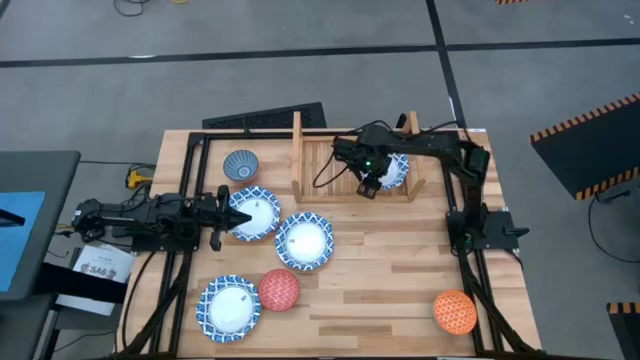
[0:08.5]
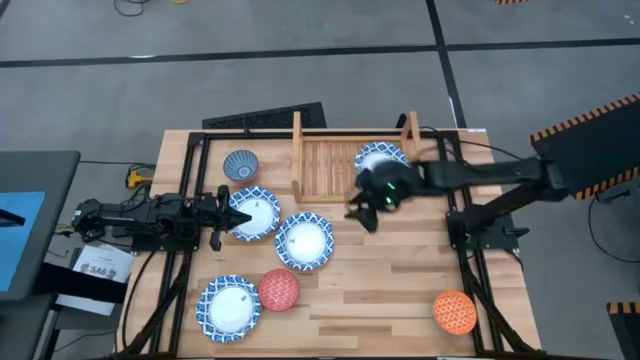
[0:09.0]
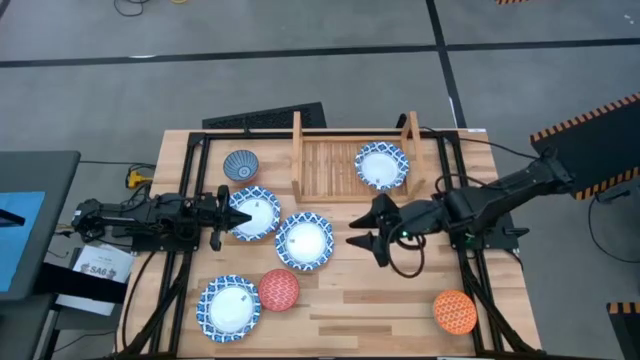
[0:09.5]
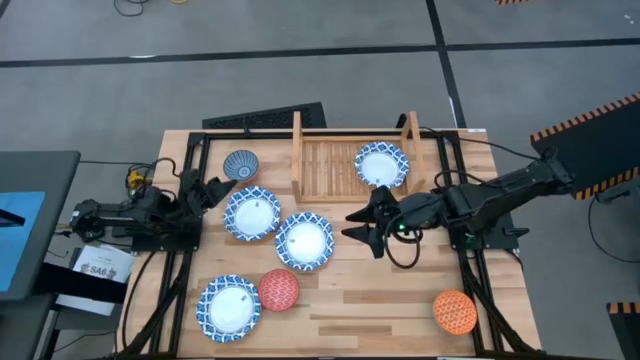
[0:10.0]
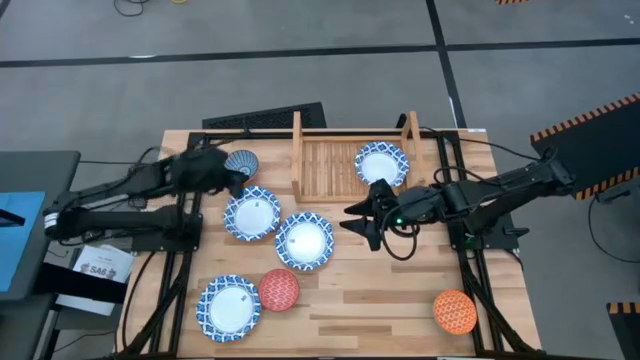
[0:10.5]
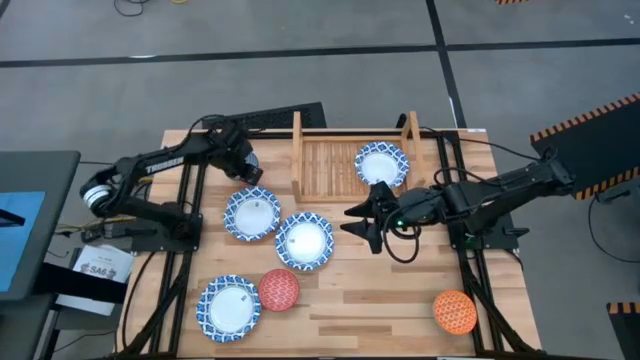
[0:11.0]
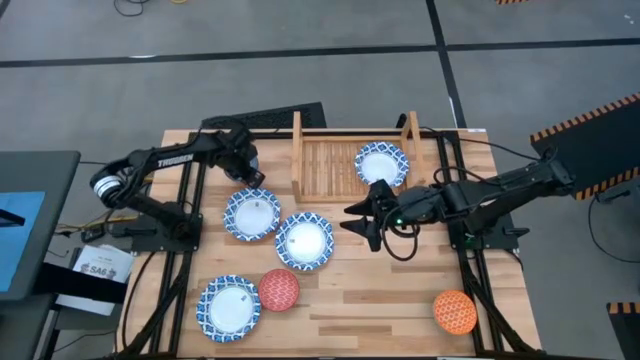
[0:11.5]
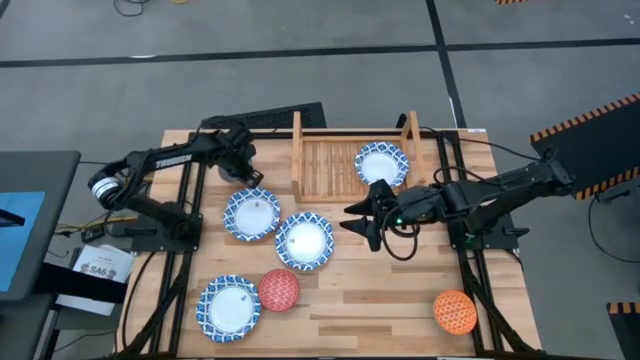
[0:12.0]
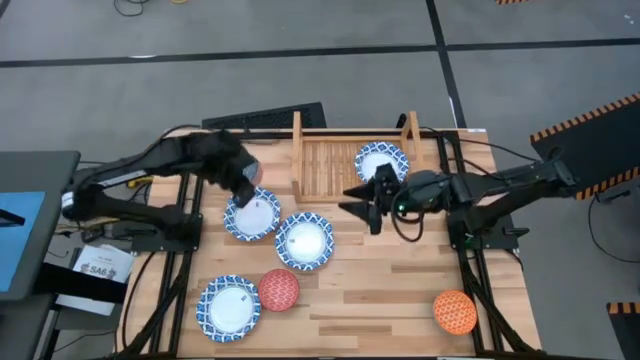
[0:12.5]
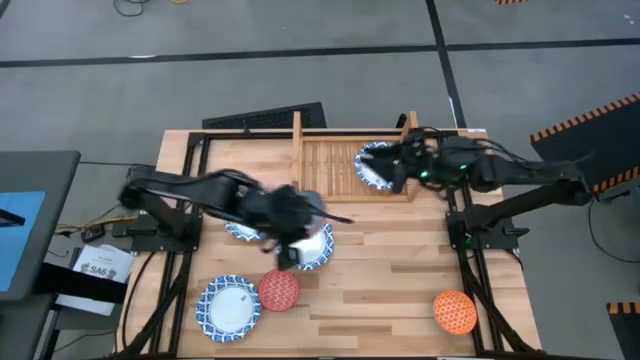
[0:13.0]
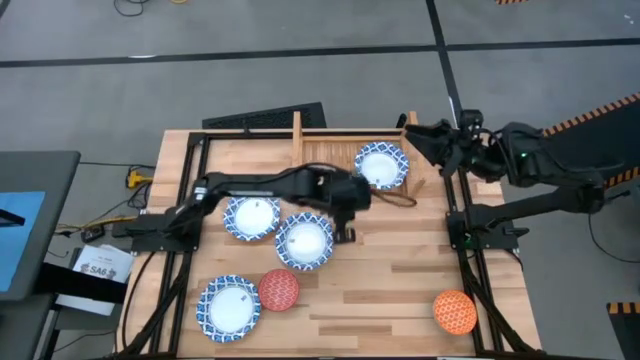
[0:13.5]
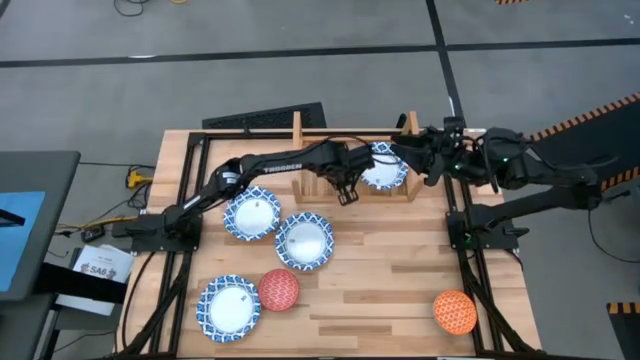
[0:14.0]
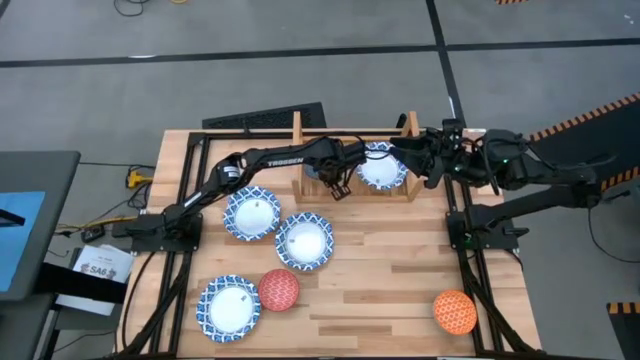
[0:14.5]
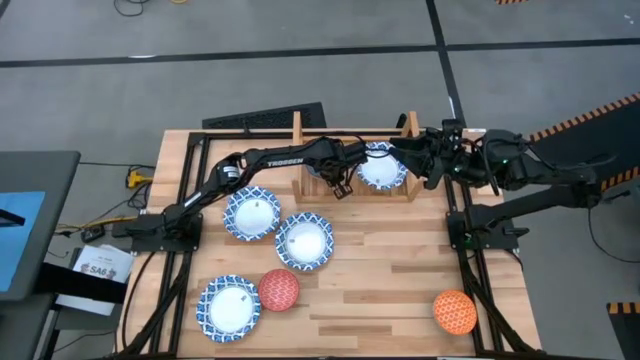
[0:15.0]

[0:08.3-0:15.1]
Task: Place and stack bowls onto a shelf
Put the dark blue small bowl on the shelf

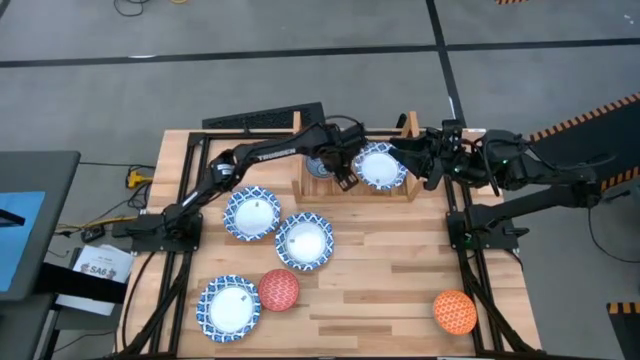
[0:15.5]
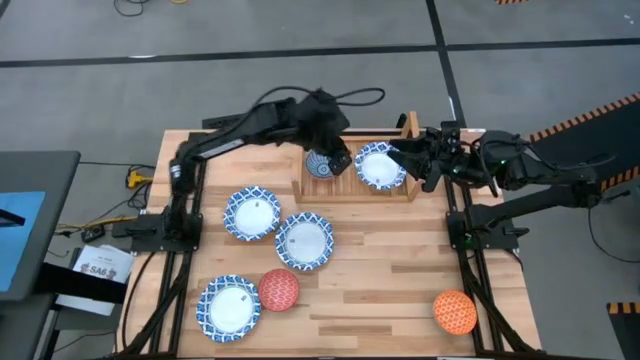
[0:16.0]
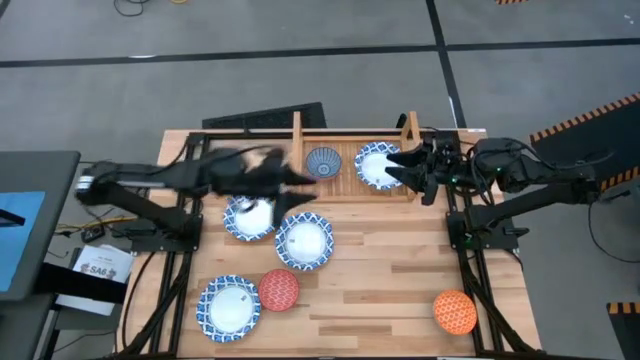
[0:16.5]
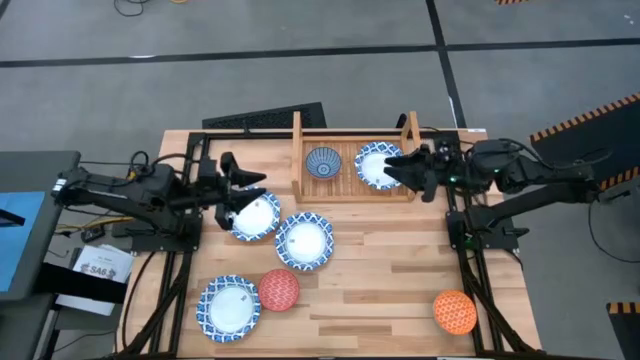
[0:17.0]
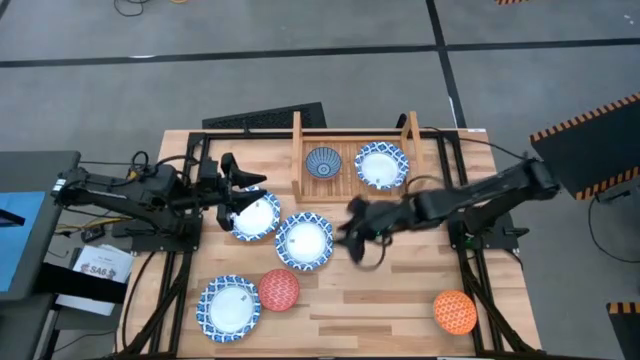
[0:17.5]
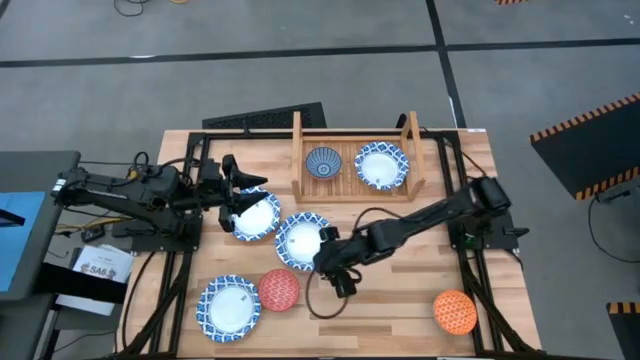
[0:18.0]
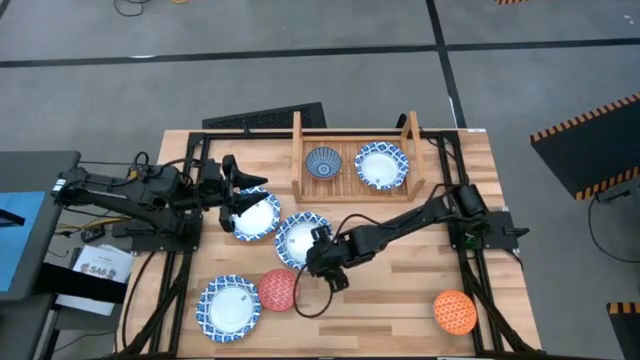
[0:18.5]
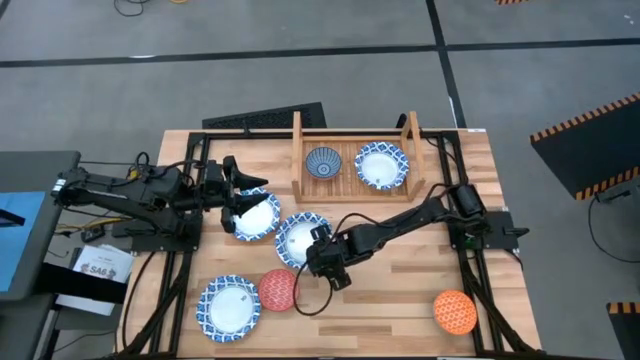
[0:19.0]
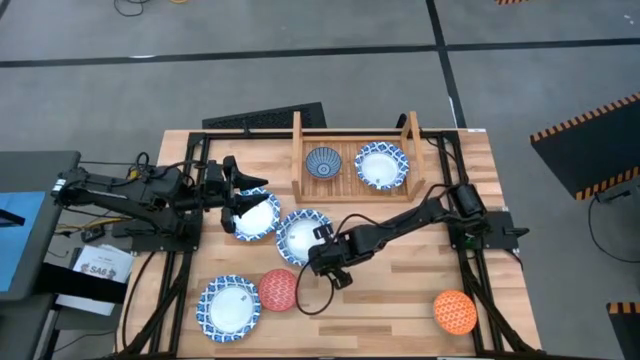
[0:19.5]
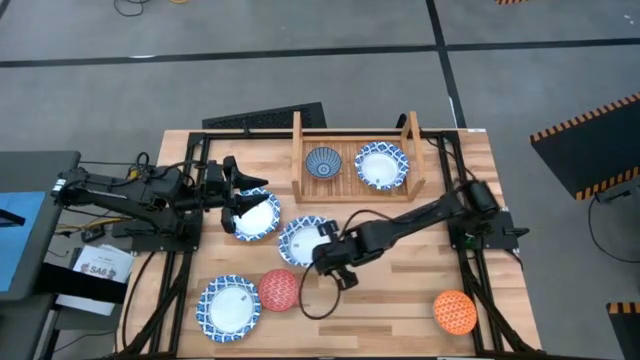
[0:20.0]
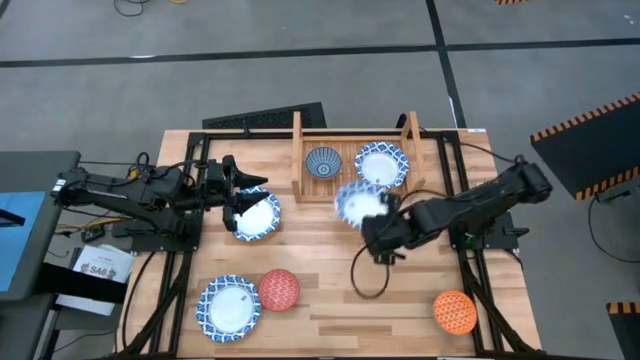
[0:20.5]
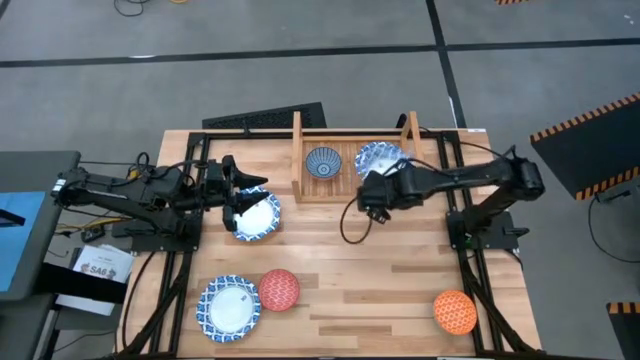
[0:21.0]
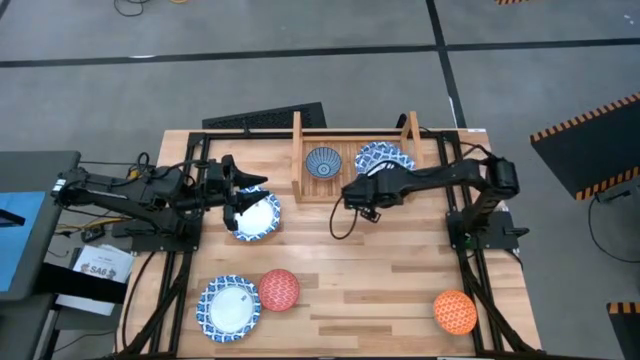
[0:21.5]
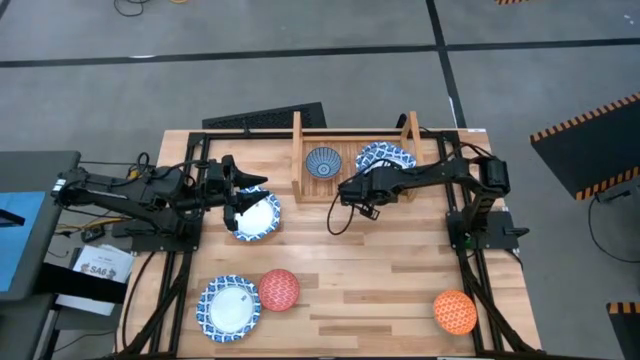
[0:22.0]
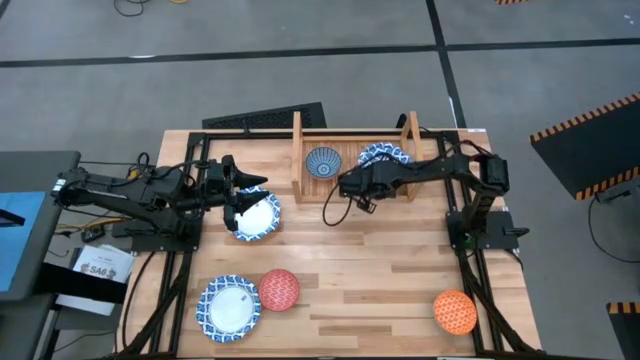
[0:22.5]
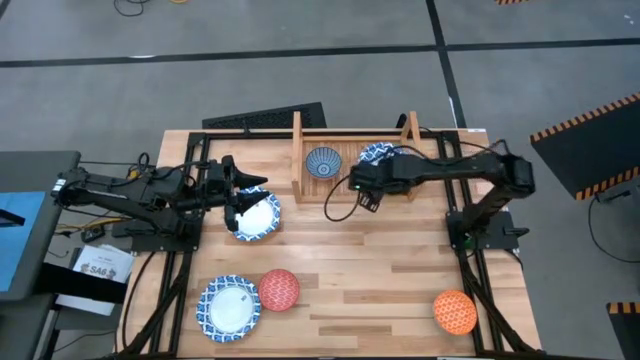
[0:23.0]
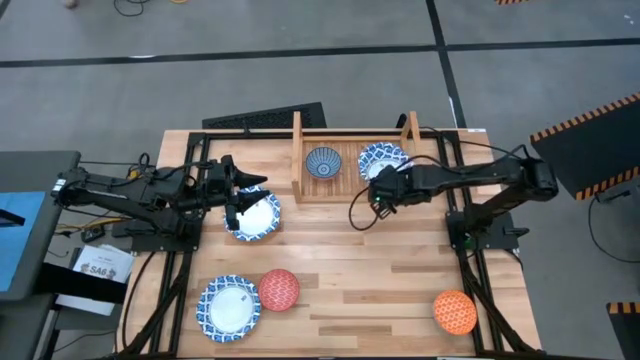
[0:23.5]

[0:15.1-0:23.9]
Stack the blue pattern large bowl into the blue pattern large bowl on the shelf

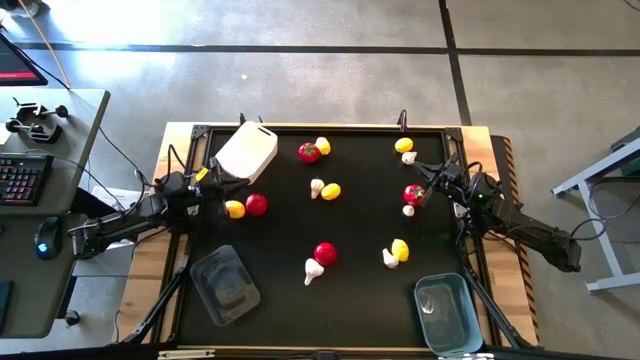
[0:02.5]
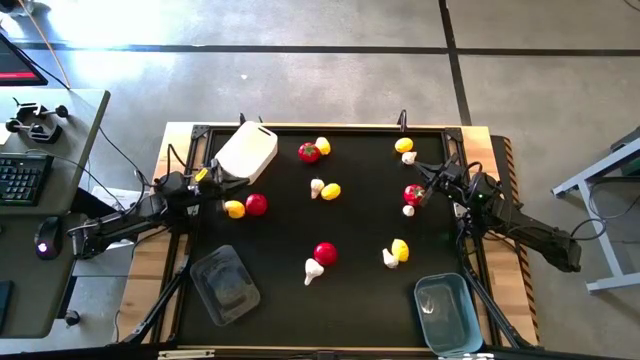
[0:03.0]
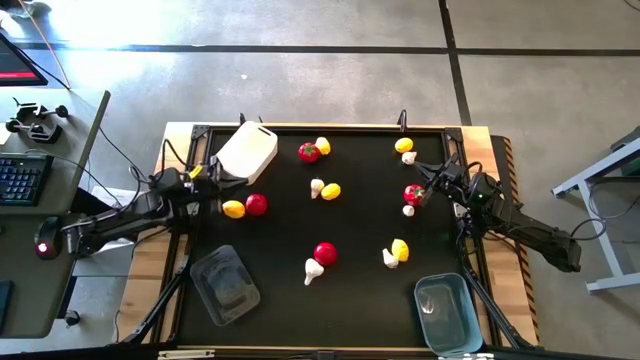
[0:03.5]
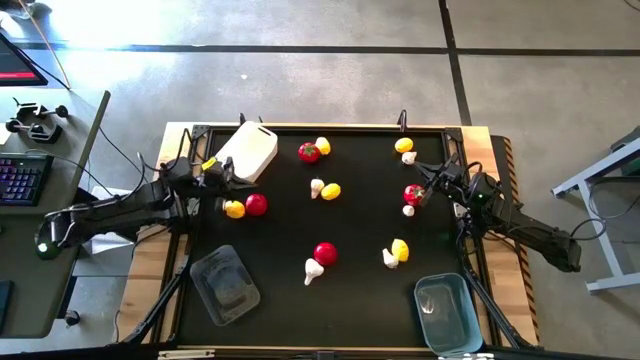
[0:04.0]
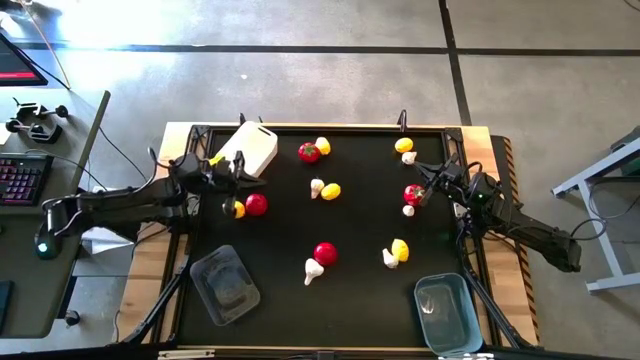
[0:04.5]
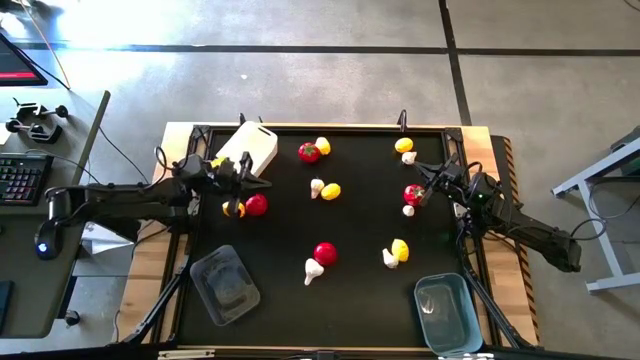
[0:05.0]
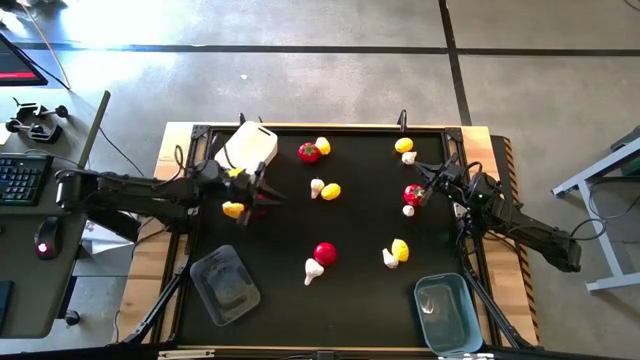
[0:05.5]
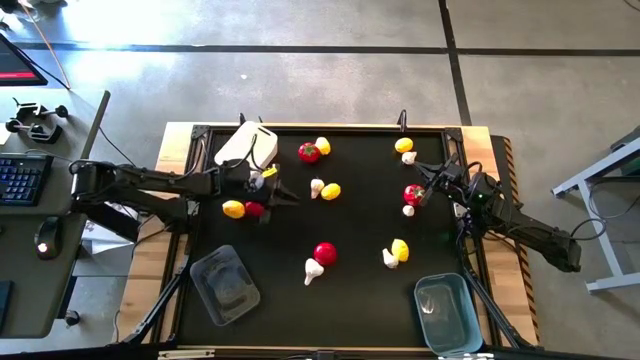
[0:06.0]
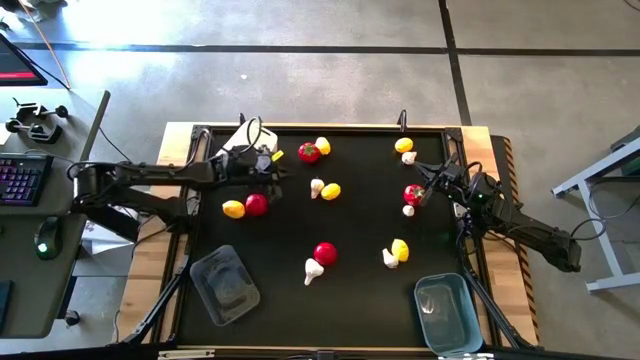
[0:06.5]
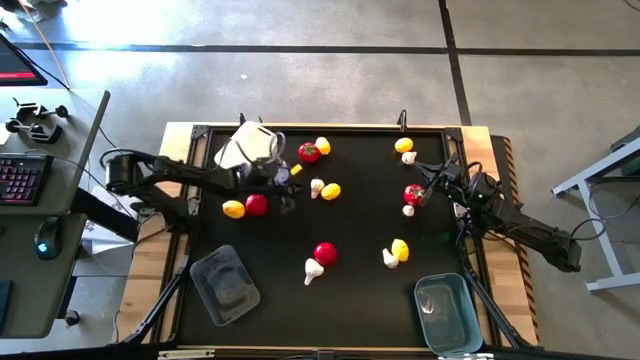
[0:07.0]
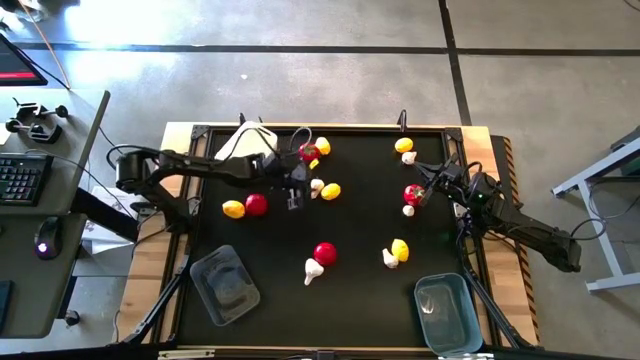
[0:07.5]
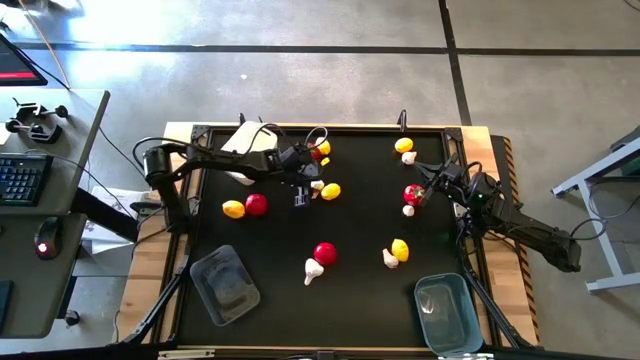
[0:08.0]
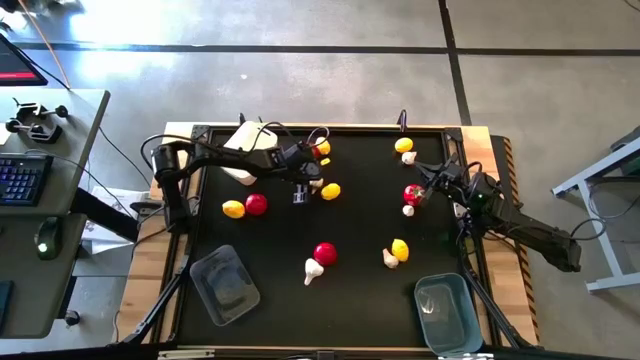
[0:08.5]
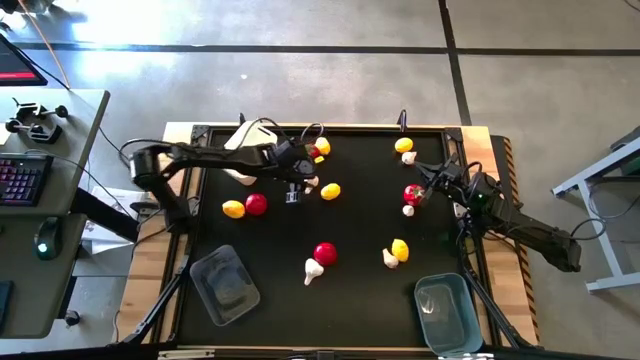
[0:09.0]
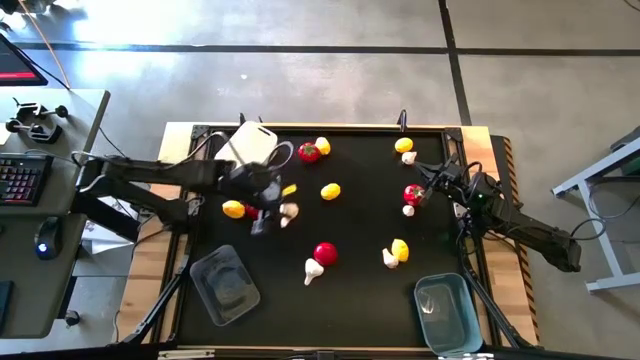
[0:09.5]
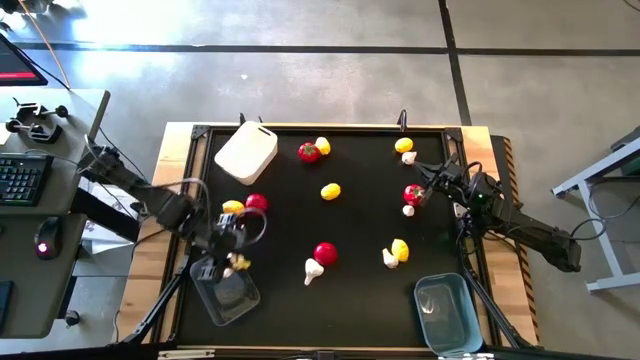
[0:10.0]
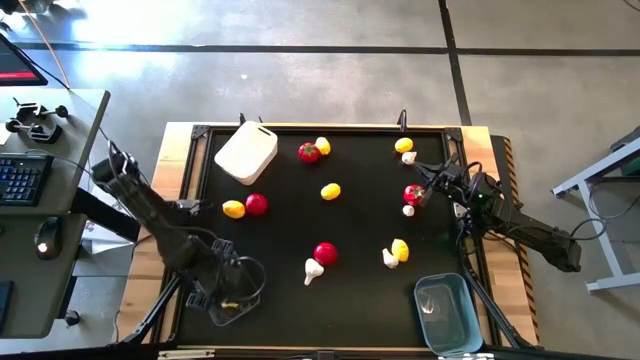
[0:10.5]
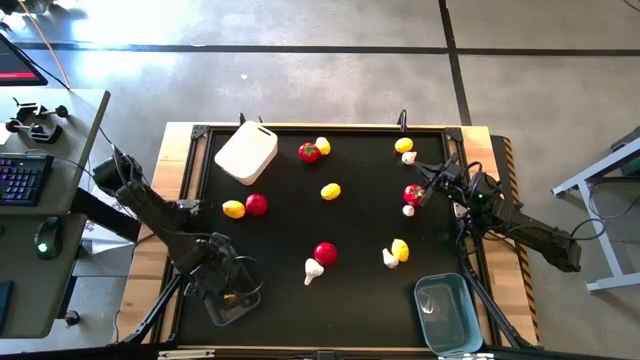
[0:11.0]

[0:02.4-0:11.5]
Task: Sort produce into baskets
Put the white garlic into the transparent bin
